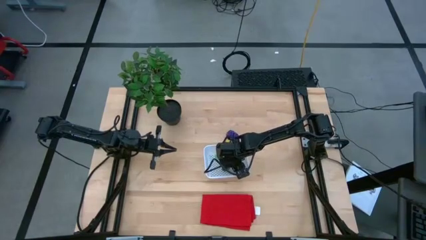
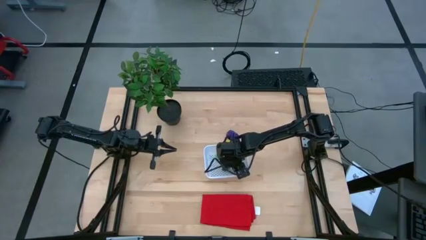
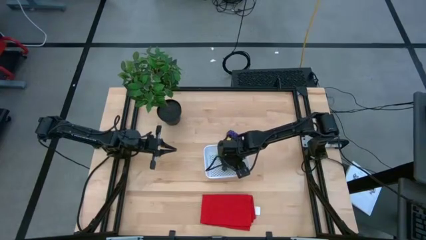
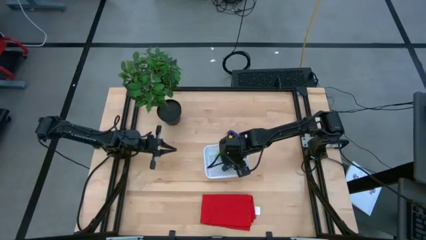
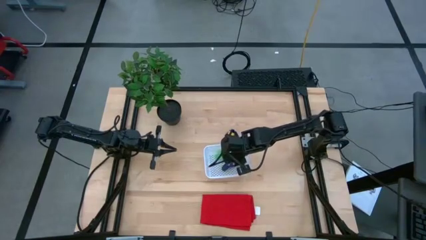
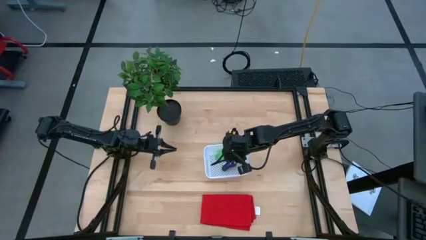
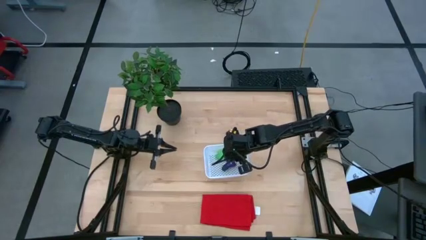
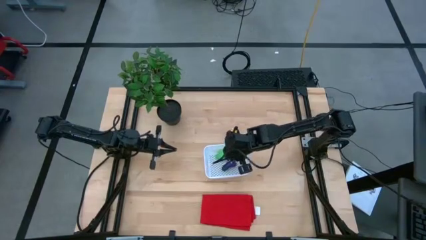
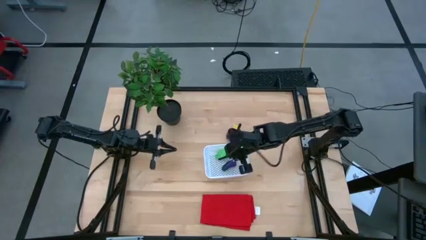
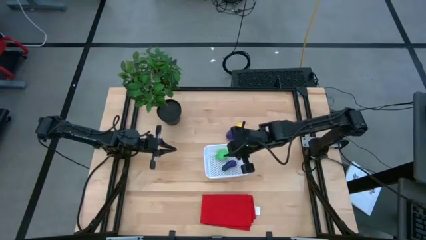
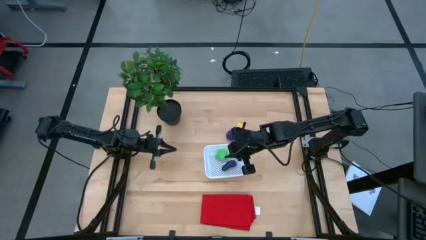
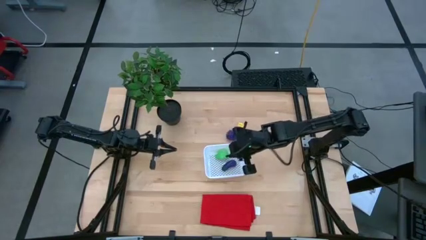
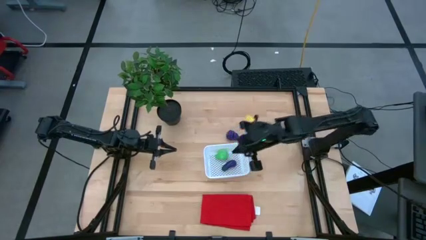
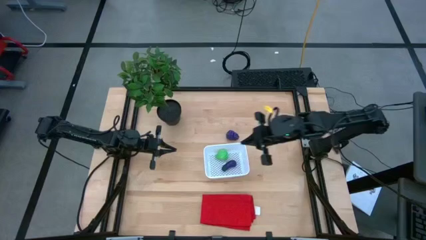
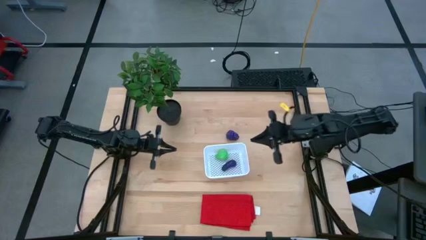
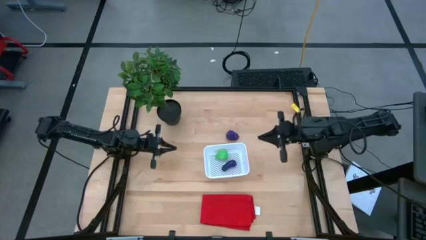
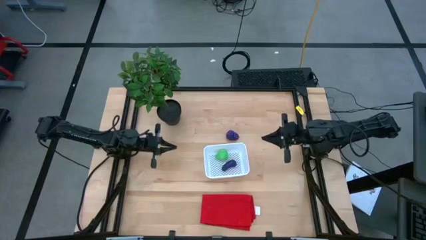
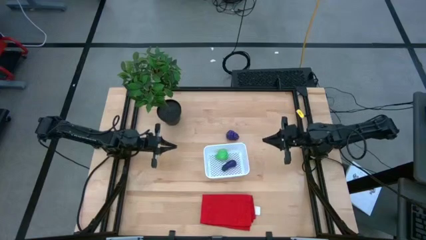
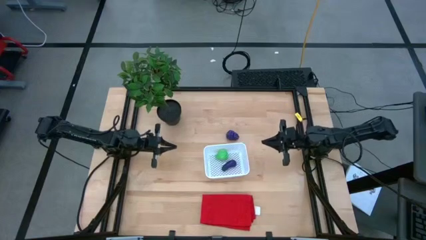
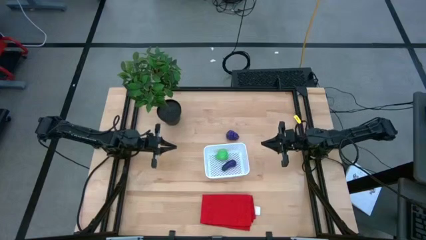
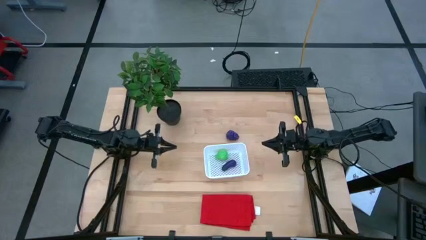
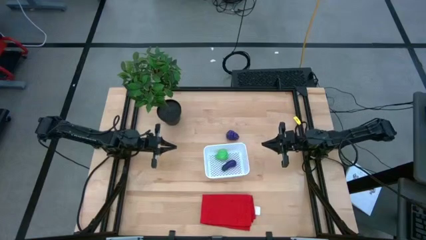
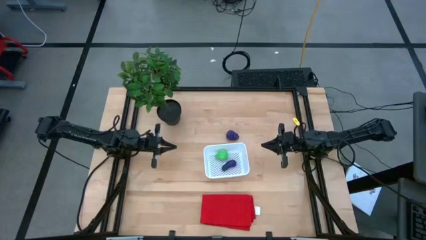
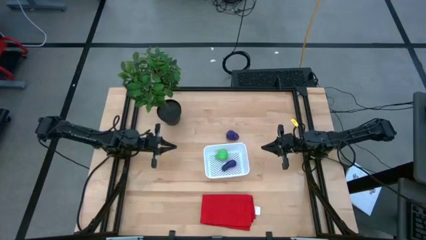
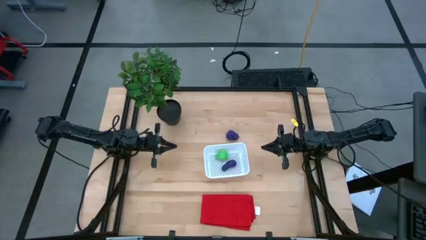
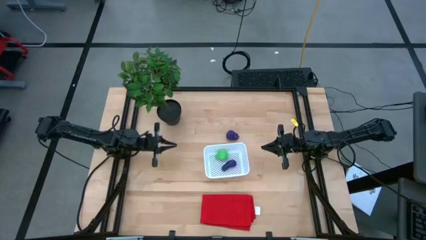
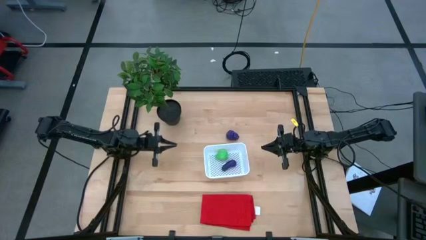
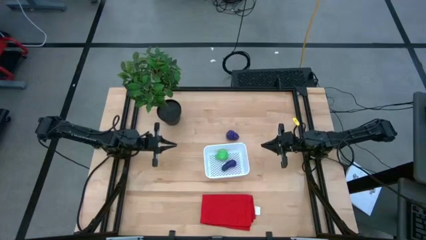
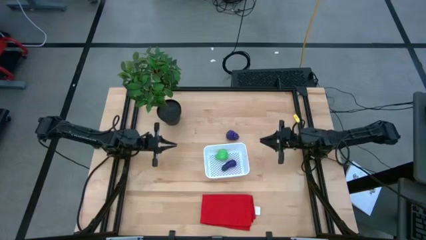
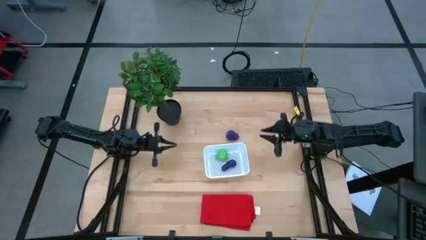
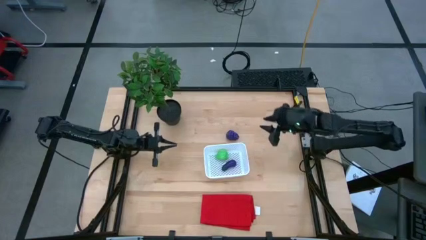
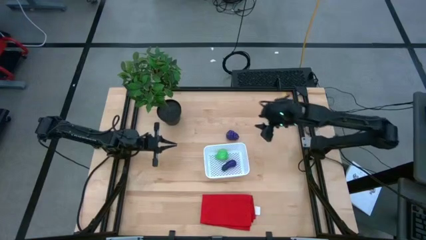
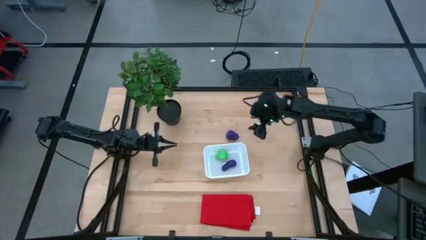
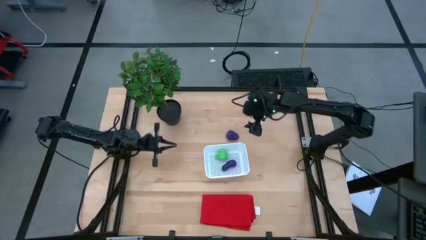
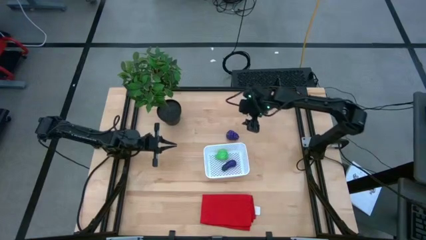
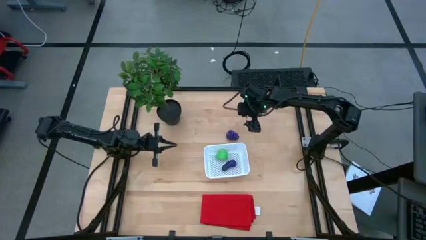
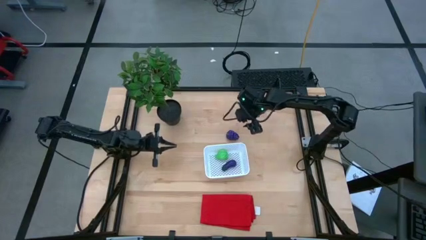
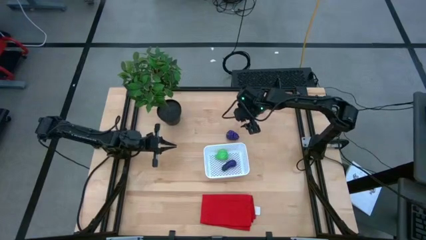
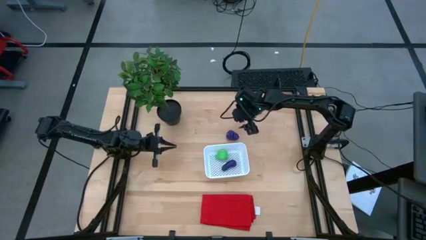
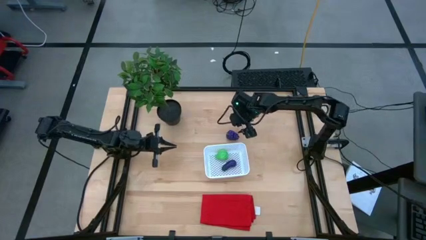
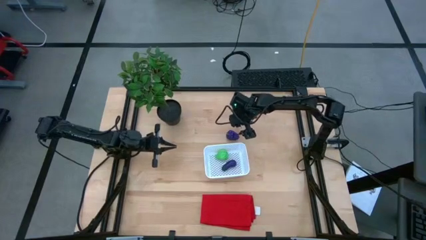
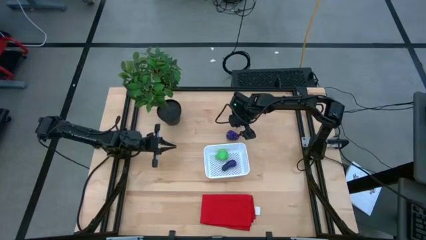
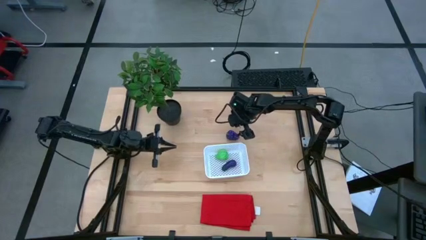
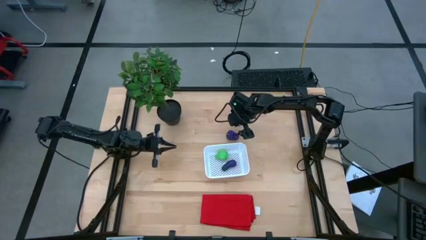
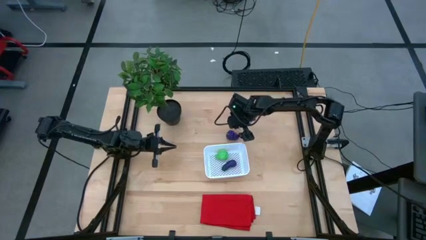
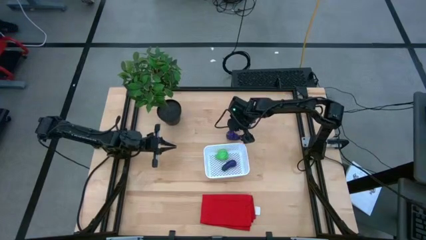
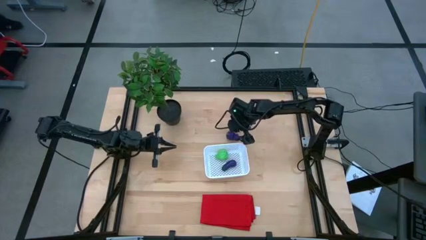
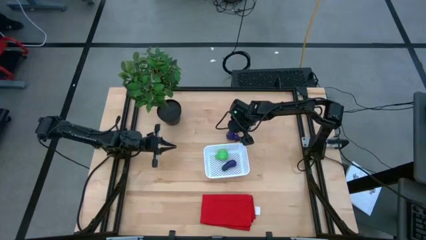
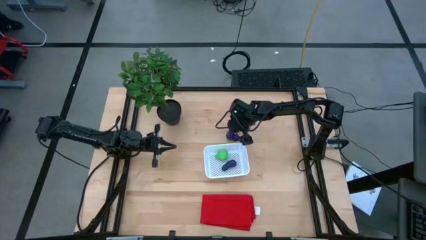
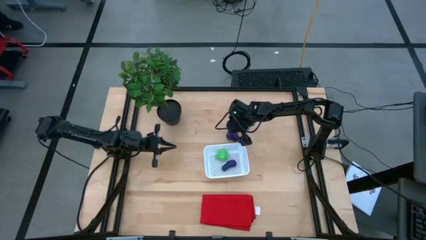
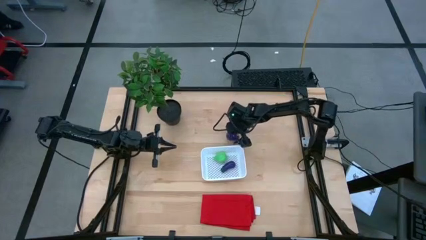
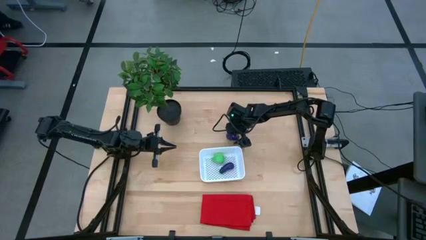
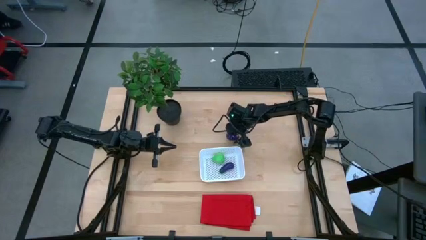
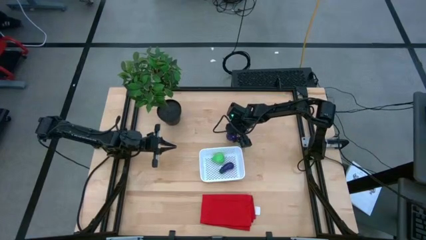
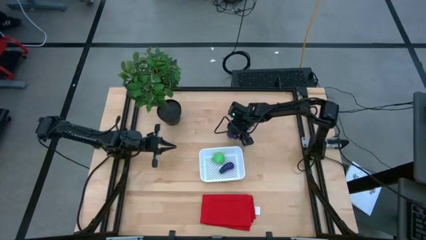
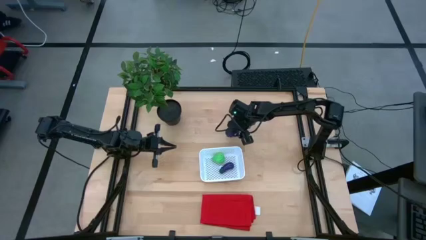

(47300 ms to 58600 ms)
Task: Pick and placing Produce into tupperware
Put the violet grape into the white bin
